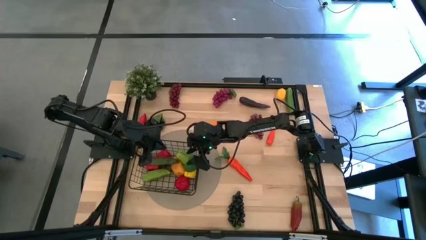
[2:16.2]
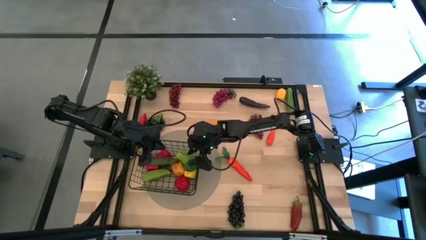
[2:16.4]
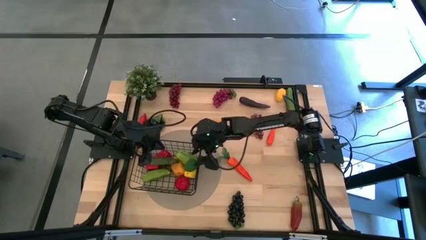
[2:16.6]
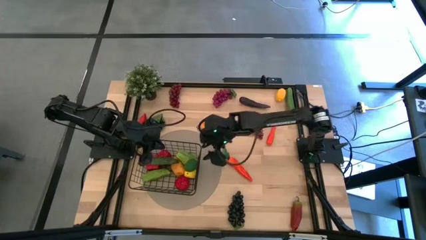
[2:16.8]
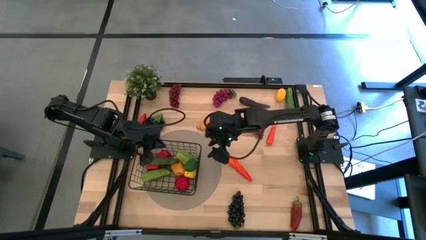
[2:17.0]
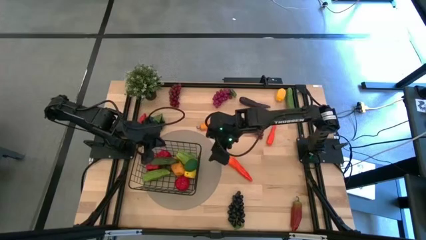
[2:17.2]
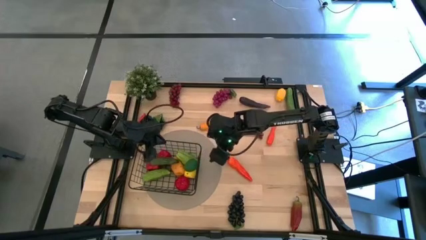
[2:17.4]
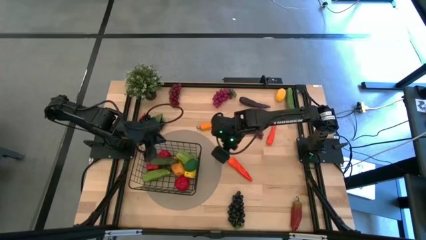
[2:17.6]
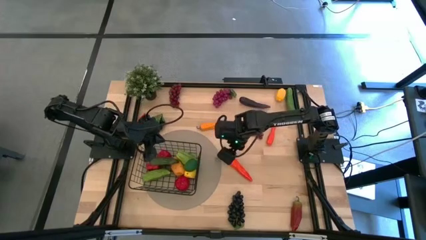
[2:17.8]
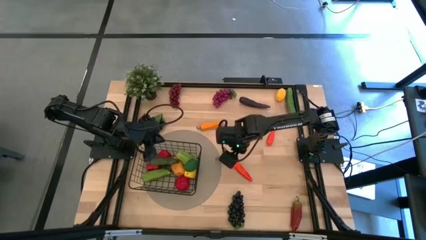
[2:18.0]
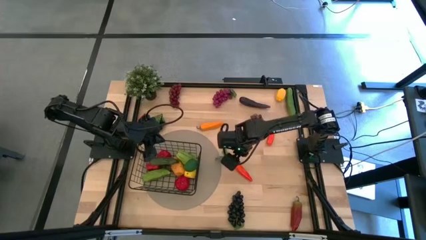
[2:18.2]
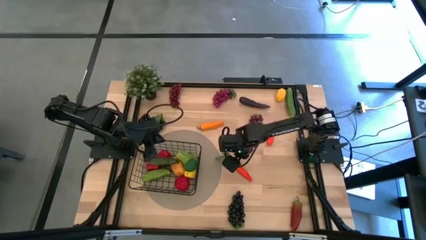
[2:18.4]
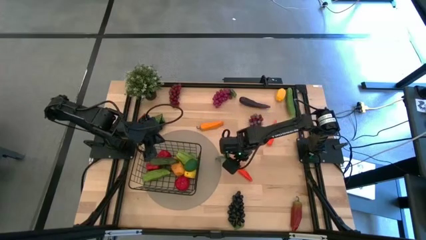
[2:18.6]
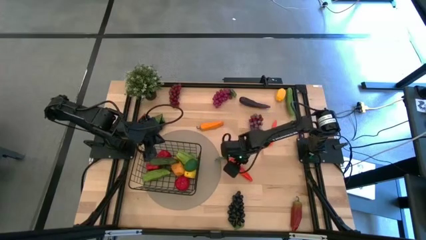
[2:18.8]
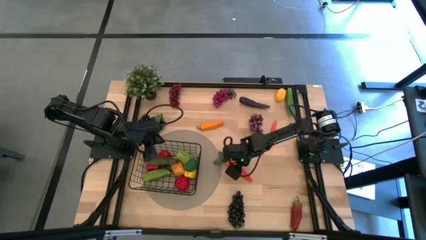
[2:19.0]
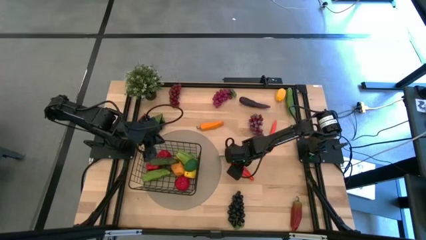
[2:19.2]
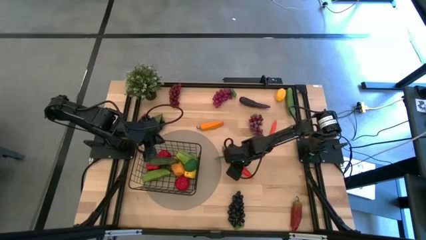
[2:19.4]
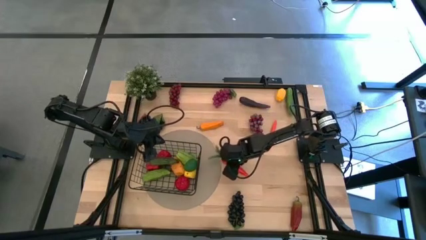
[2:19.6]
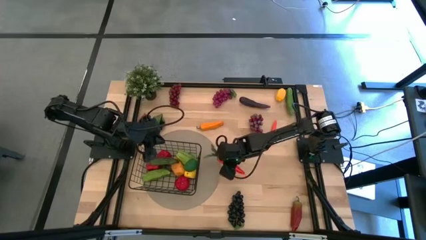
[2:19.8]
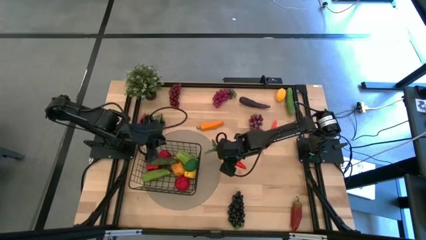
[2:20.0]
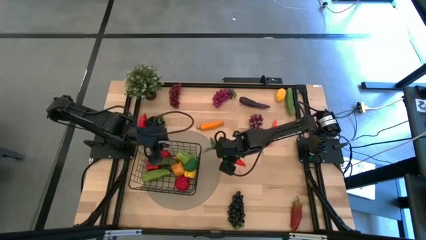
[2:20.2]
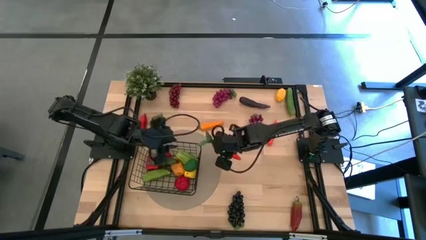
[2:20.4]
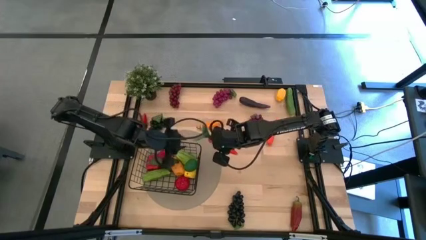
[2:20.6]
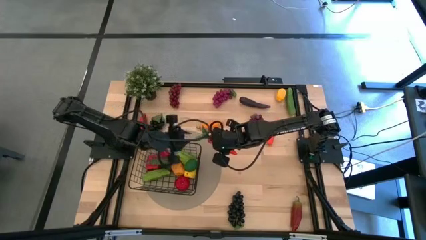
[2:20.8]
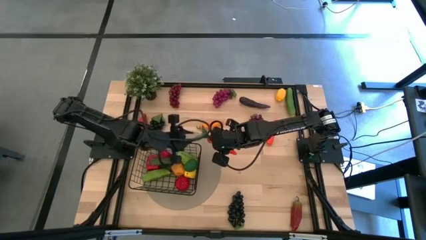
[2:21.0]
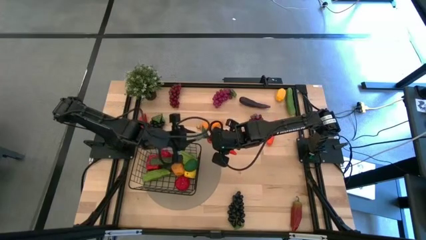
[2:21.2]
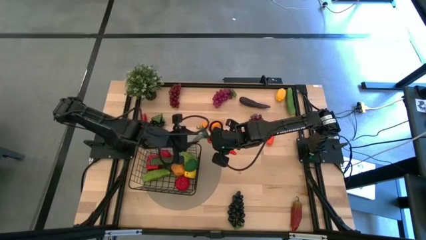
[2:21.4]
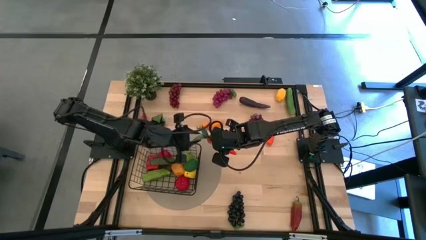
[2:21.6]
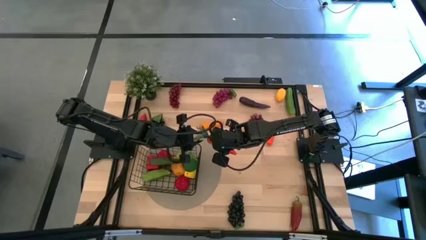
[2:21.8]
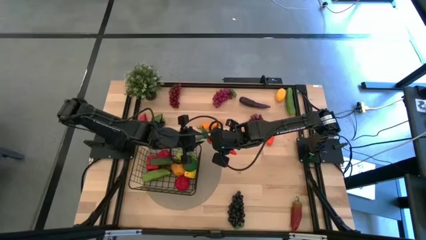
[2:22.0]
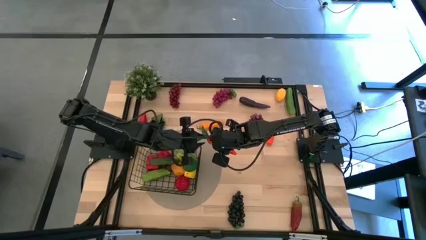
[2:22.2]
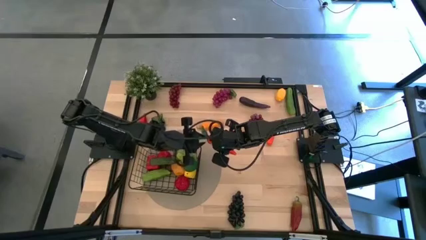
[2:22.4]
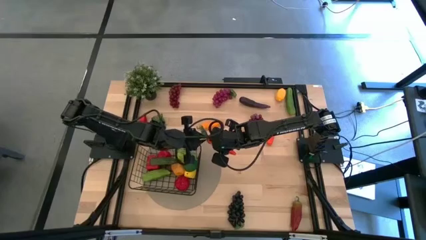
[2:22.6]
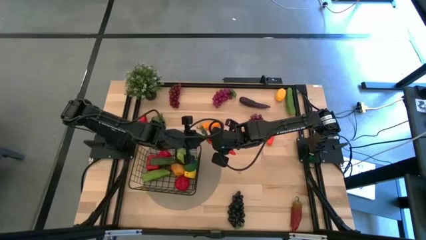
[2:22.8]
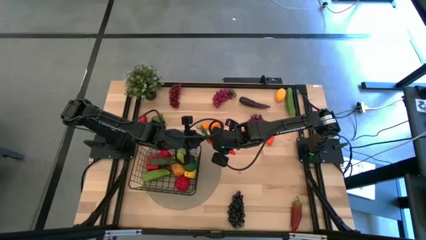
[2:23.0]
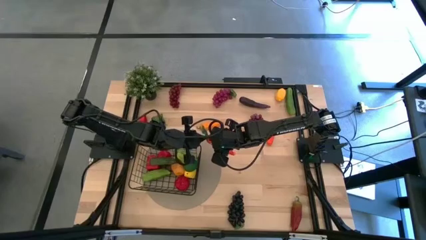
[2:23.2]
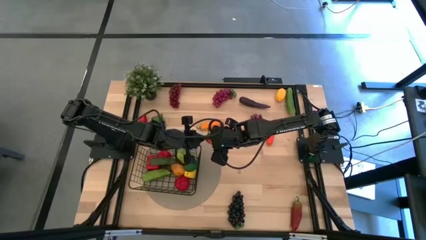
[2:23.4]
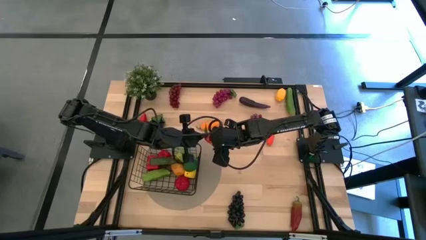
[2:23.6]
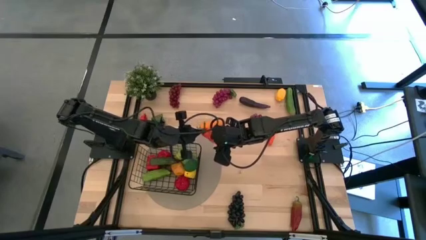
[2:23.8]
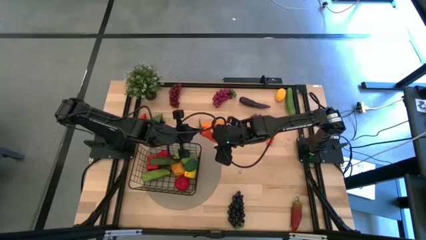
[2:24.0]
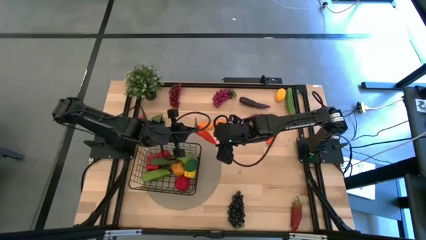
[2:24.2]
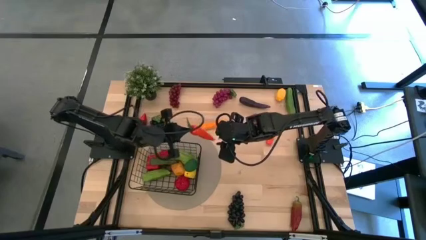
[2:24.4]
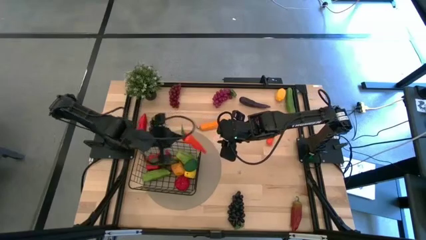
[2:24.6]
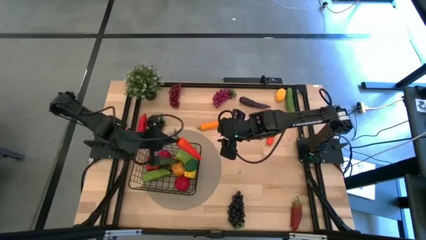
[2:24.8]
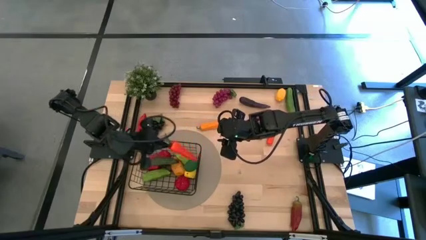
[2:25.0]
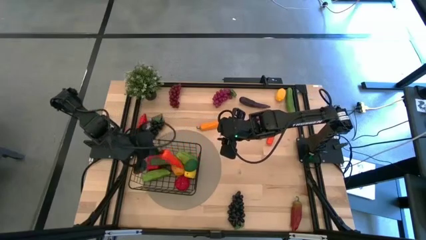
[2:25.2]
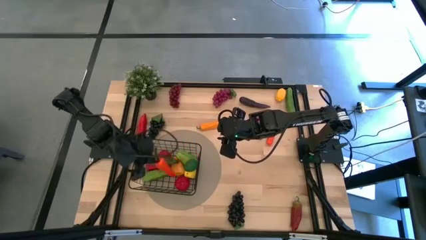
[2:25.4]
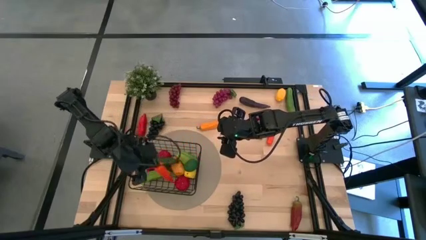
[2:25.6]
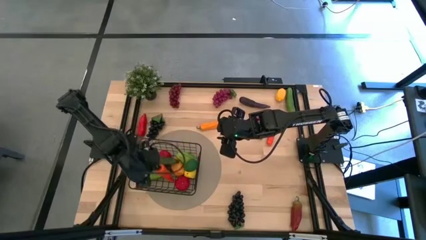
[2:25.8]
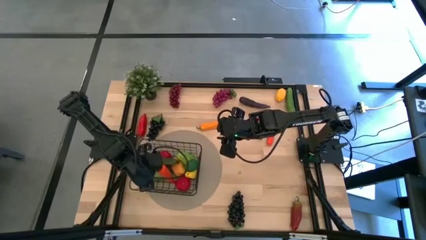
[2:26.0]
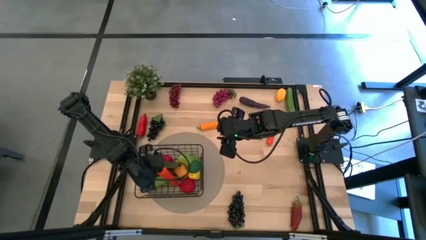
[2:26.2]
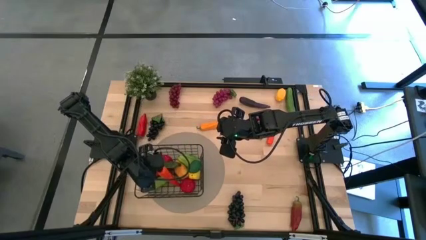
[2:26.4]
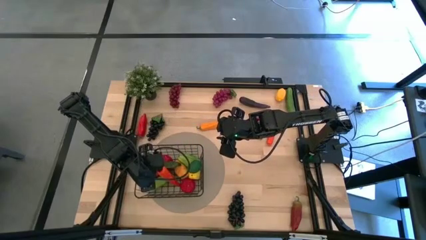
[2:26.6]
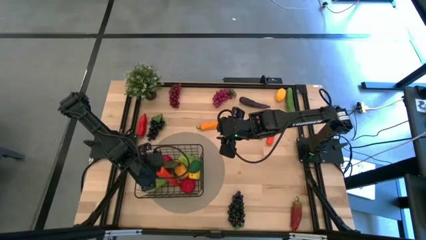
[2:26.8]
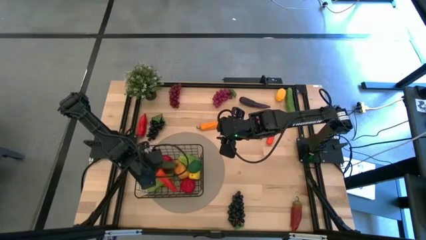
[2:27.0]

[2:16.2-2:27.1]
Task: Build produce basket
Put the bottom orange carrot into the black wire basket

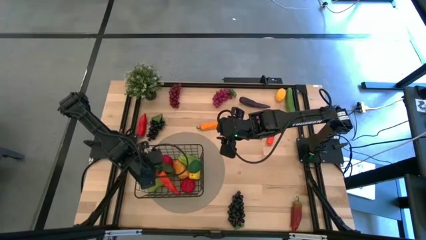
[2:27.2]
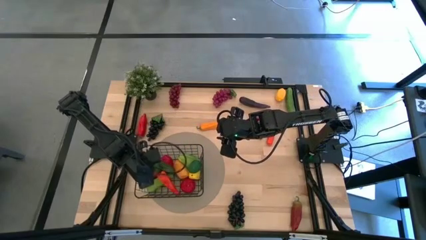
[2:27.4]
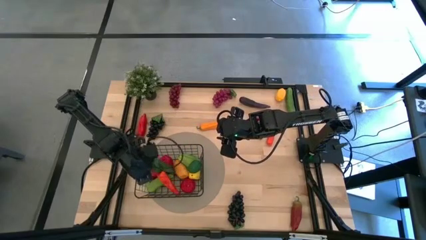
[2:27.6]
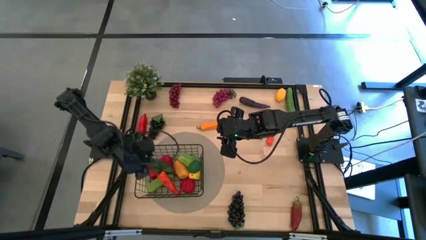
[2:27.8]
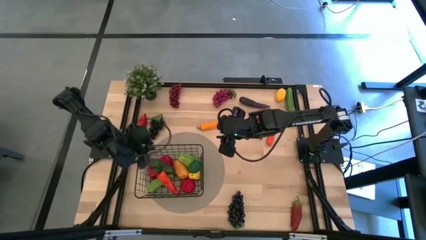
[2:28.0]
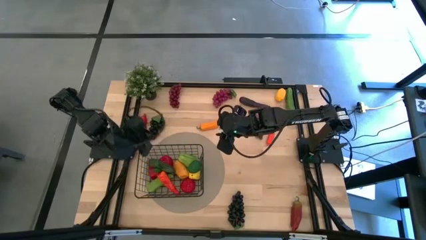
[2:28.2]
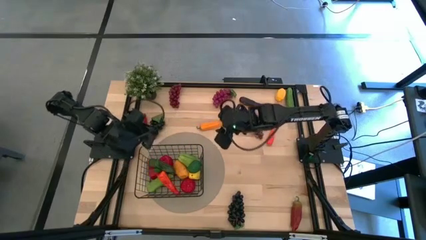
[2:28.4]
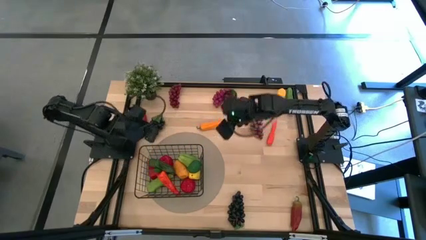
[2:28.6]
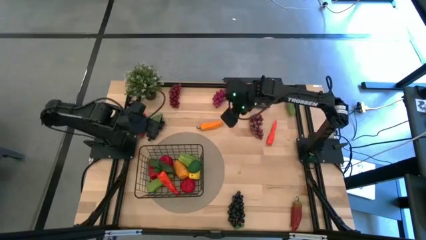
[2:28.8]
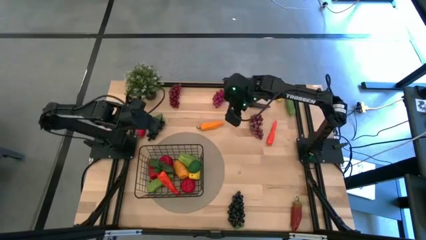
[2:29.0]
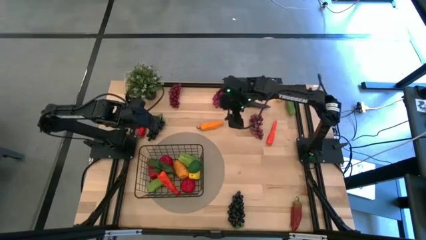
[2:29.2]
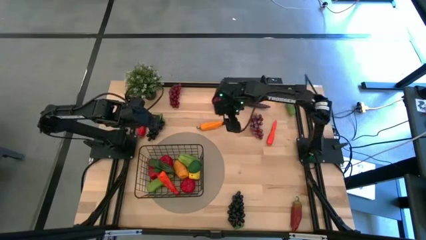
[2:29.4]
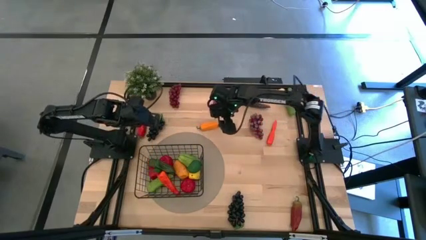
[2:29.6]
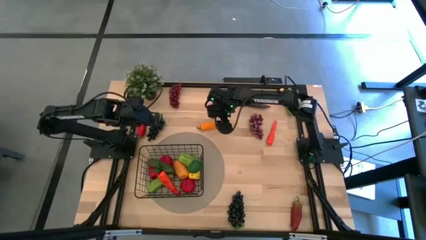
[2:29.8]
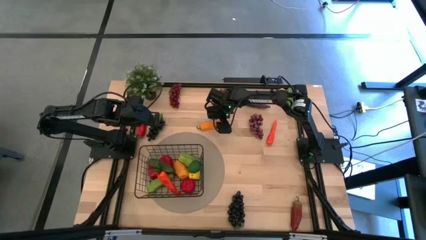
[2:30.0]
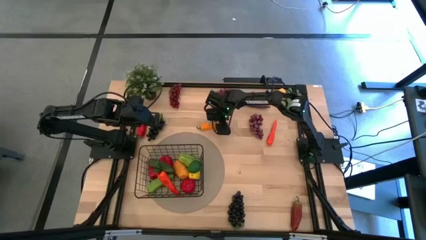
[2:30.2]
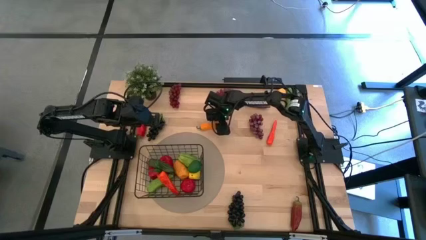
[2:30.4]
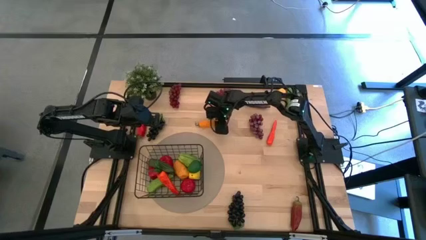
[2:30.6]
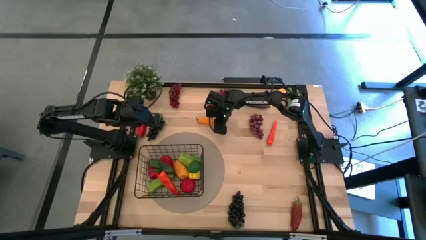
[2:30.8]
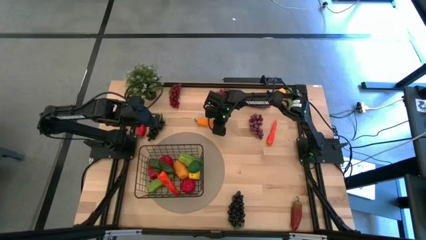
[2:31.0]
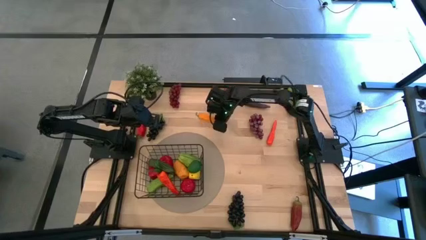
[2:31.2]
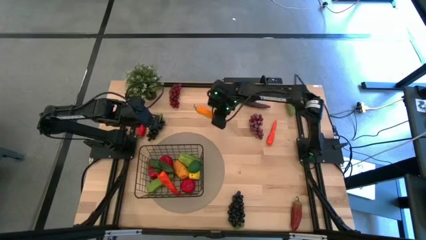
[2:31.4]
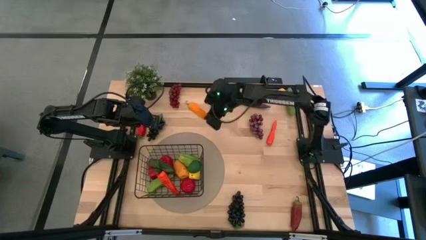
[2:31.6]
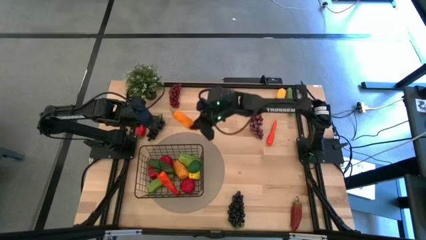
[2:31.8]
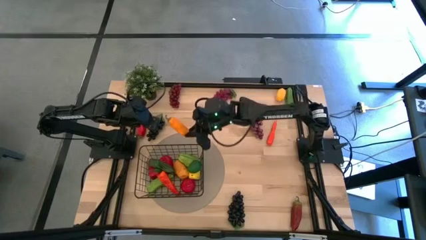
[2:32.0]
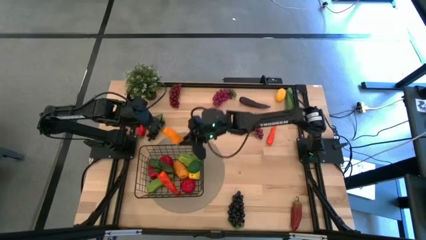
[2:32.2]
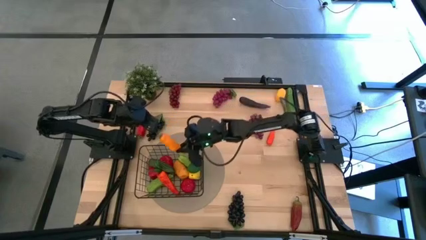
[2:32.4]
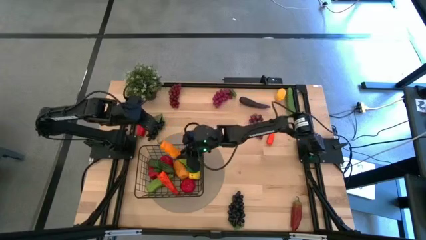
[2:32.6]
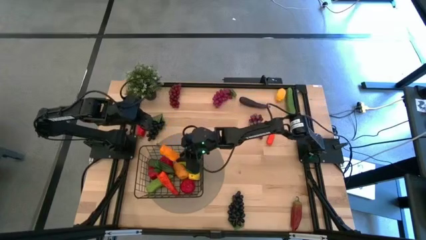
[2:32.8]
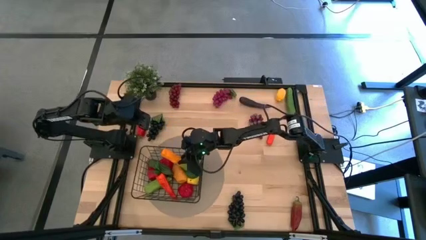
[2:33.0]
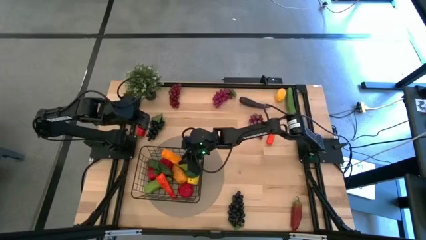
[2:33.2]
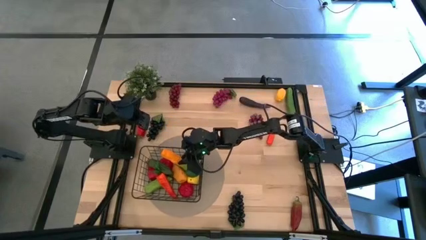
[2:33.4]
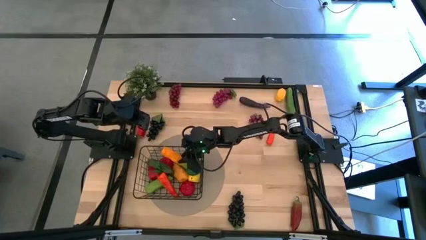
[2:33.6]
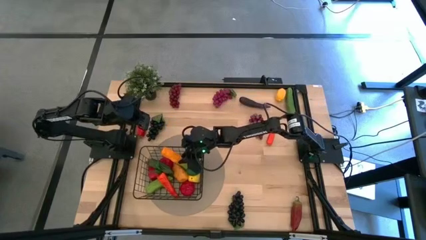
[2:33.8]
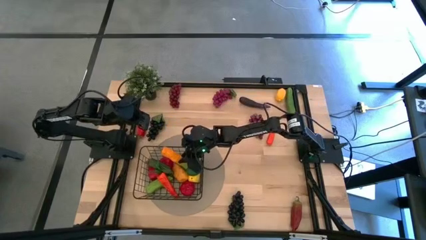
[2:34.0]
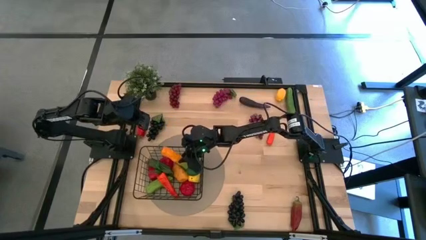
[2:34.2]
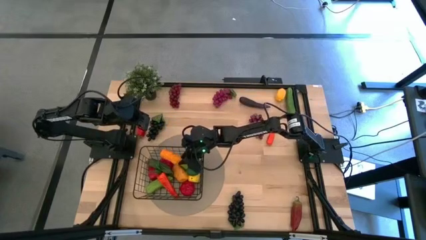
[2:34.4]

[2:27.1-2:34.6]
Put the yellow chili pepper into the black wire basket
